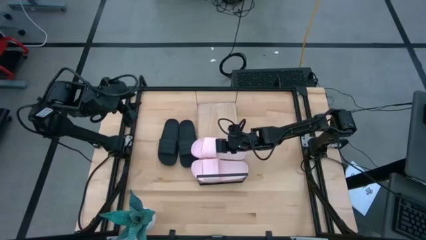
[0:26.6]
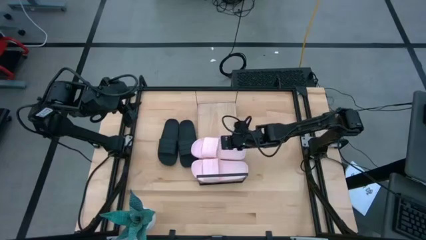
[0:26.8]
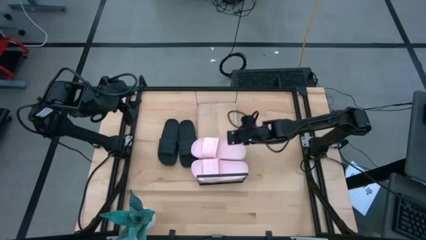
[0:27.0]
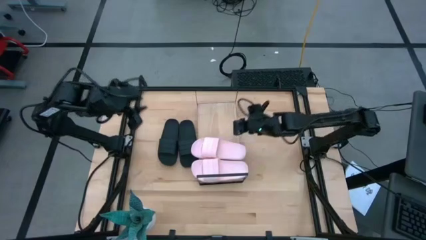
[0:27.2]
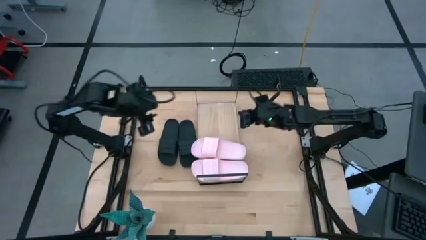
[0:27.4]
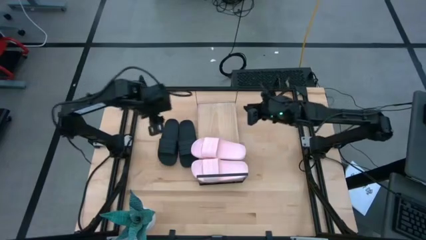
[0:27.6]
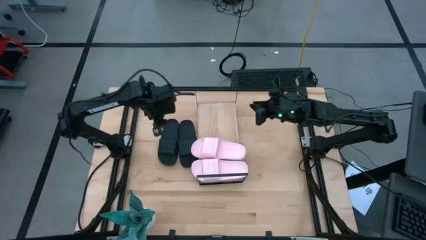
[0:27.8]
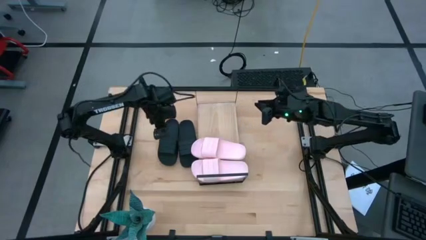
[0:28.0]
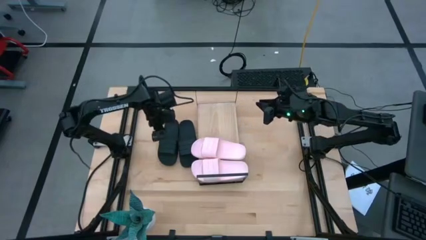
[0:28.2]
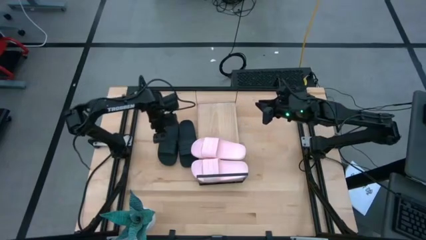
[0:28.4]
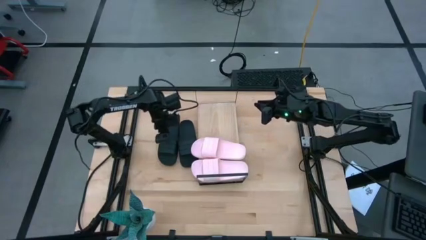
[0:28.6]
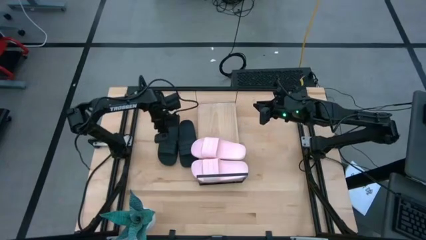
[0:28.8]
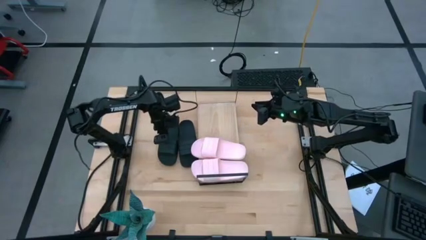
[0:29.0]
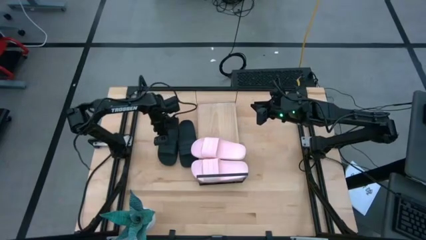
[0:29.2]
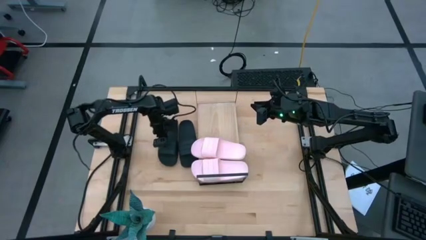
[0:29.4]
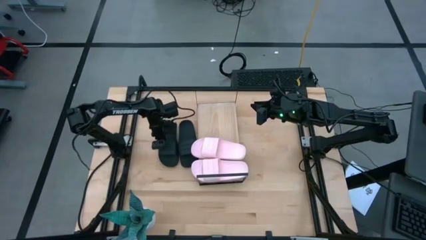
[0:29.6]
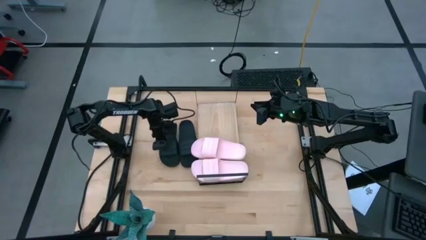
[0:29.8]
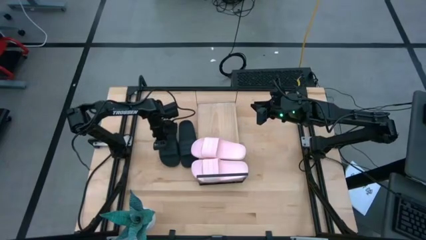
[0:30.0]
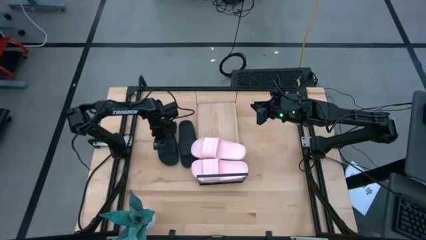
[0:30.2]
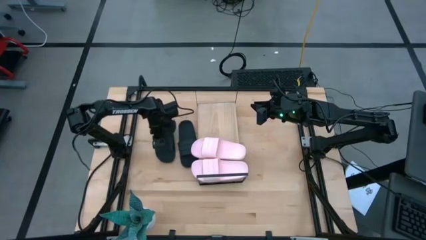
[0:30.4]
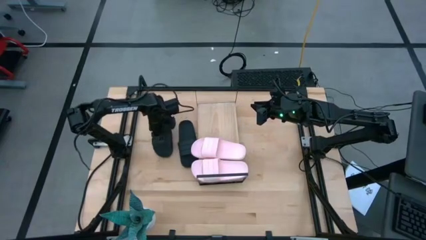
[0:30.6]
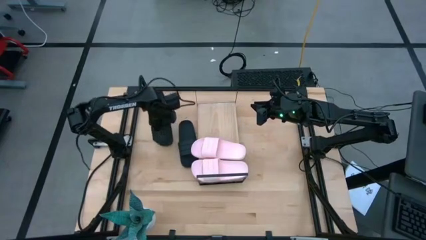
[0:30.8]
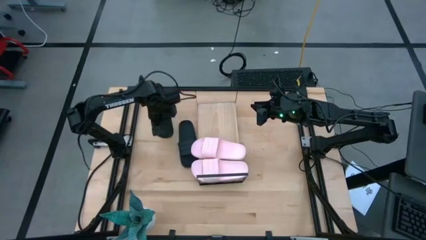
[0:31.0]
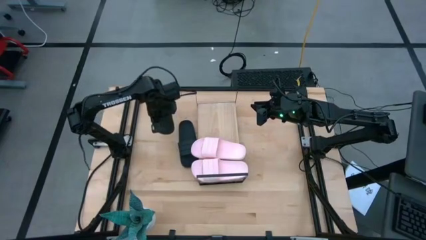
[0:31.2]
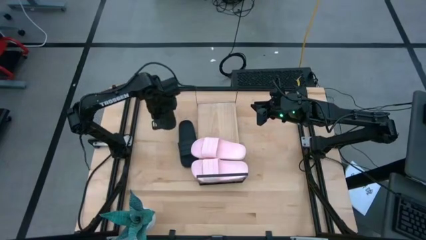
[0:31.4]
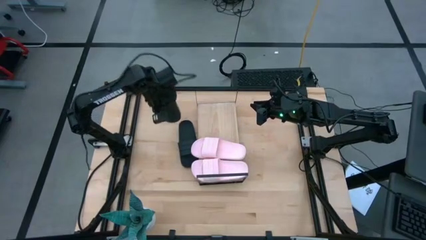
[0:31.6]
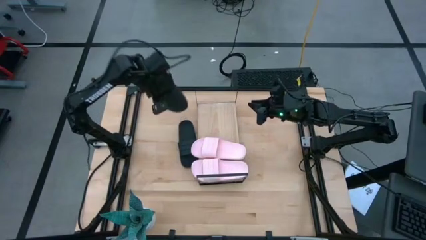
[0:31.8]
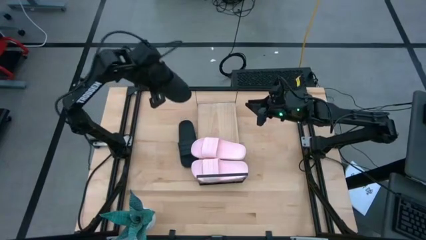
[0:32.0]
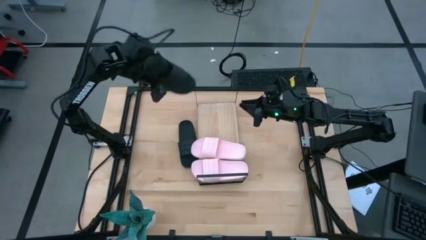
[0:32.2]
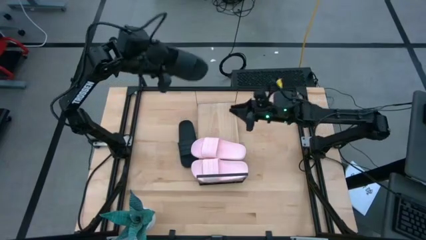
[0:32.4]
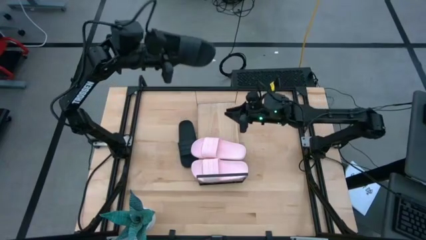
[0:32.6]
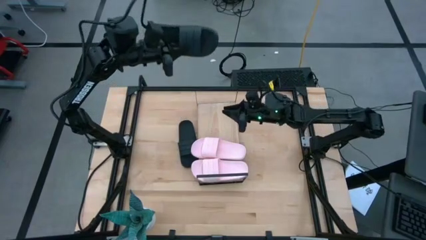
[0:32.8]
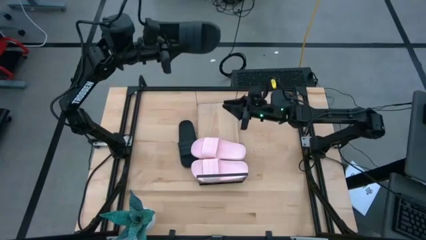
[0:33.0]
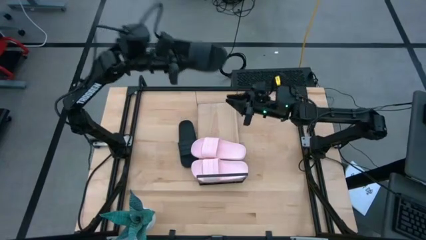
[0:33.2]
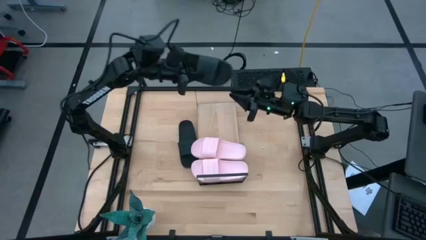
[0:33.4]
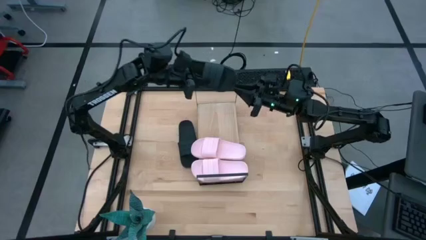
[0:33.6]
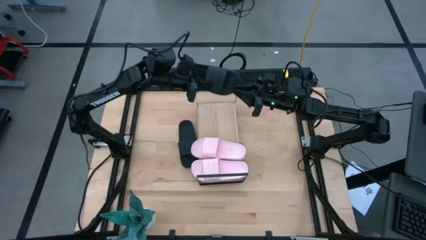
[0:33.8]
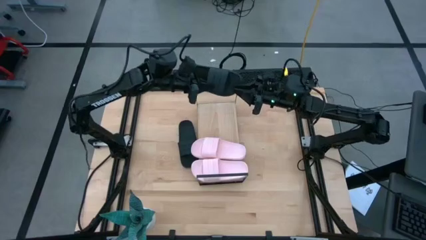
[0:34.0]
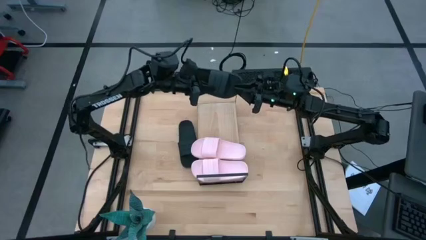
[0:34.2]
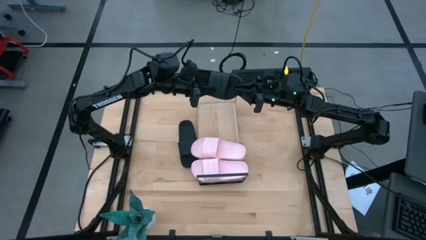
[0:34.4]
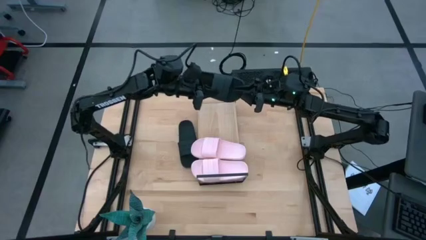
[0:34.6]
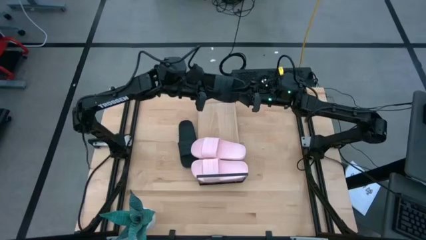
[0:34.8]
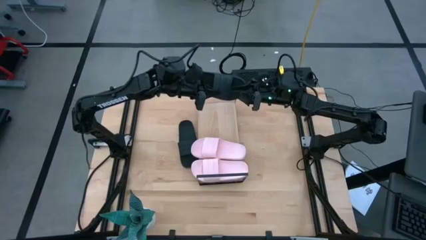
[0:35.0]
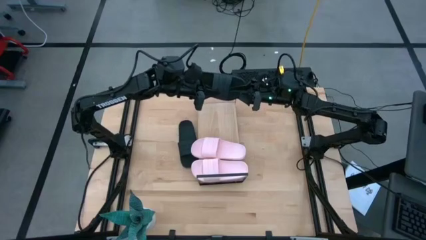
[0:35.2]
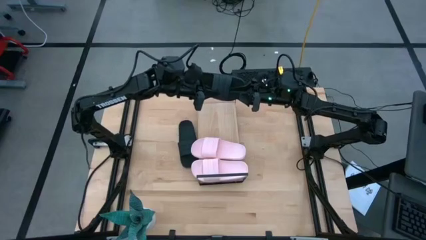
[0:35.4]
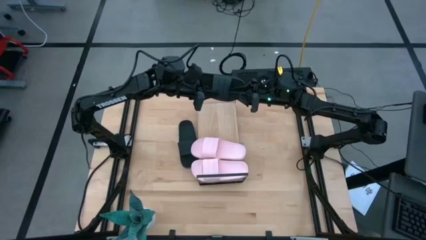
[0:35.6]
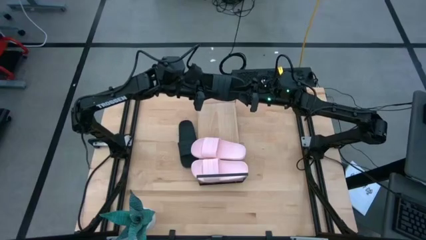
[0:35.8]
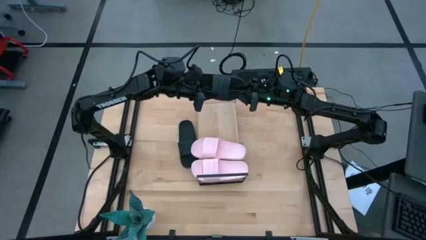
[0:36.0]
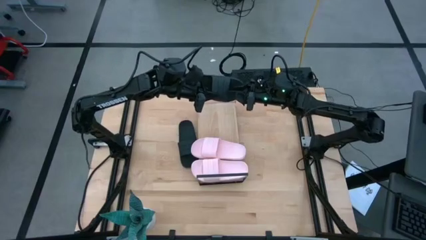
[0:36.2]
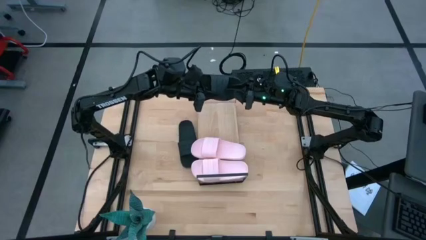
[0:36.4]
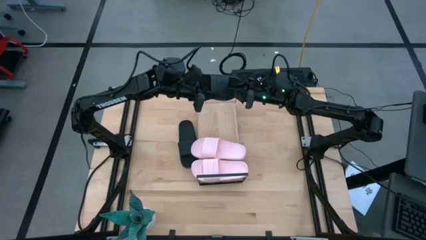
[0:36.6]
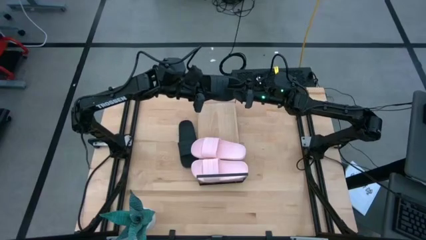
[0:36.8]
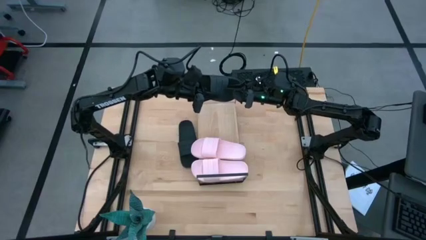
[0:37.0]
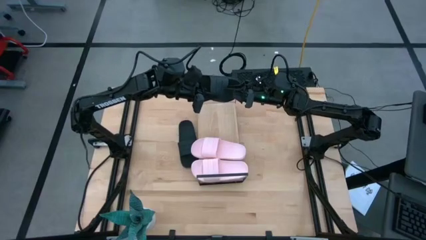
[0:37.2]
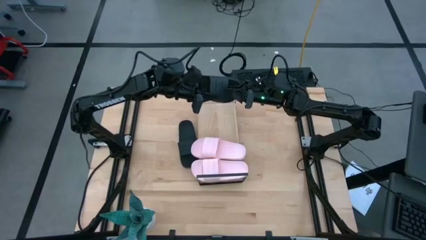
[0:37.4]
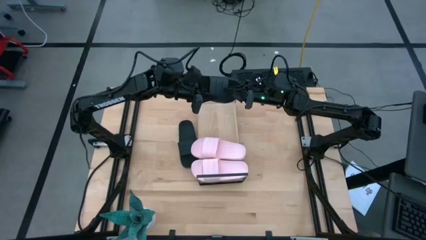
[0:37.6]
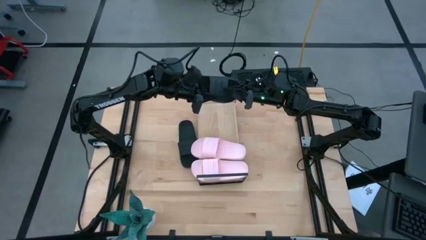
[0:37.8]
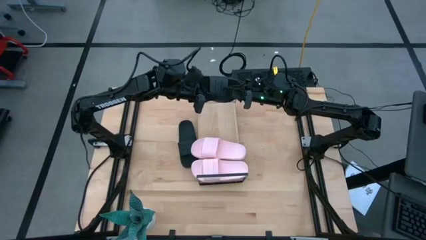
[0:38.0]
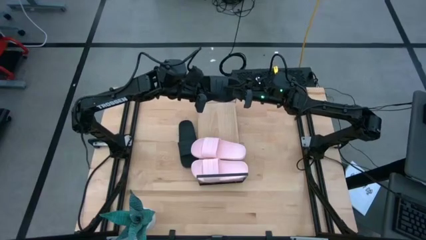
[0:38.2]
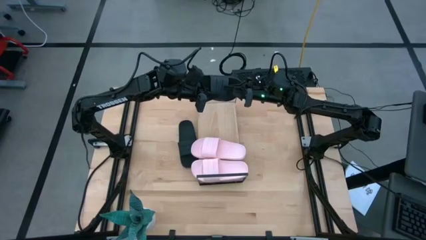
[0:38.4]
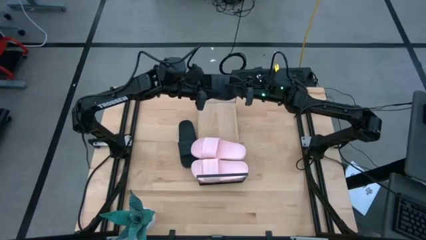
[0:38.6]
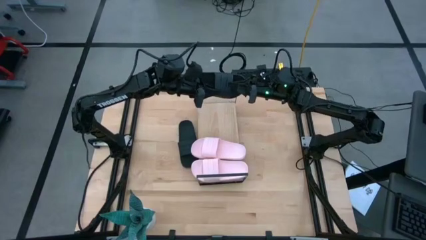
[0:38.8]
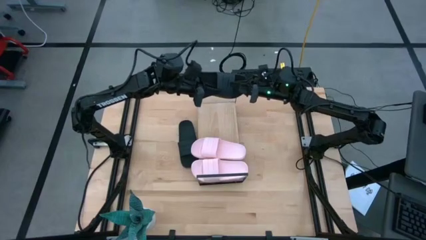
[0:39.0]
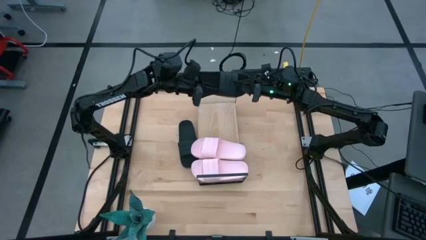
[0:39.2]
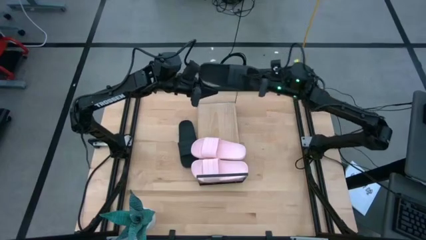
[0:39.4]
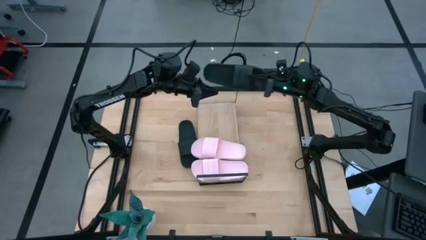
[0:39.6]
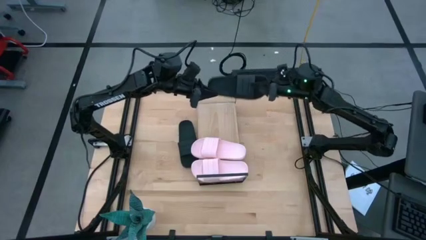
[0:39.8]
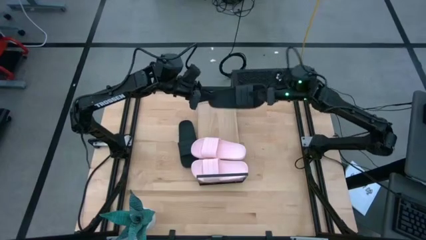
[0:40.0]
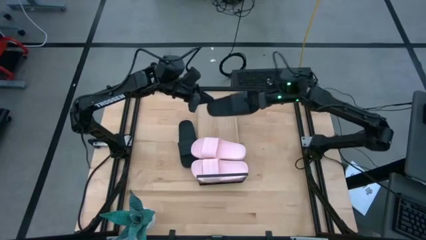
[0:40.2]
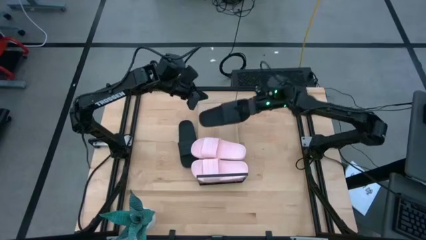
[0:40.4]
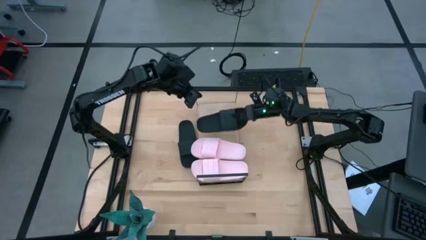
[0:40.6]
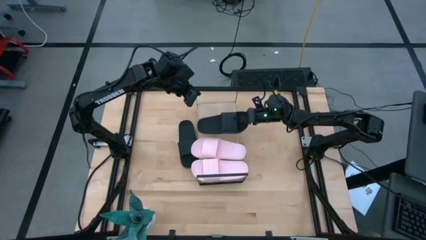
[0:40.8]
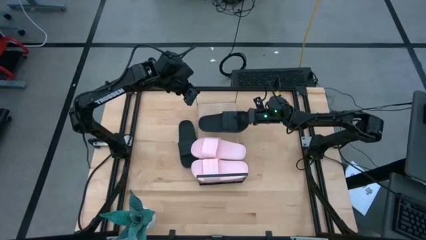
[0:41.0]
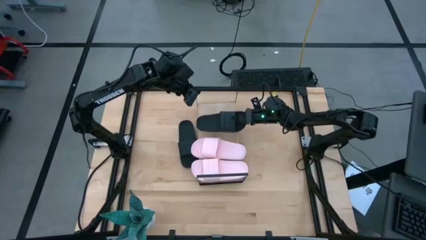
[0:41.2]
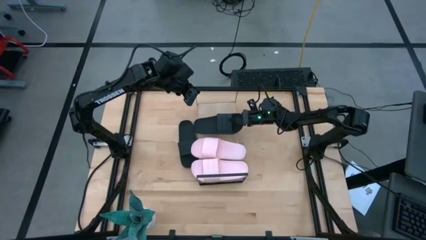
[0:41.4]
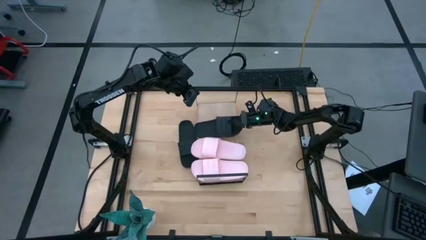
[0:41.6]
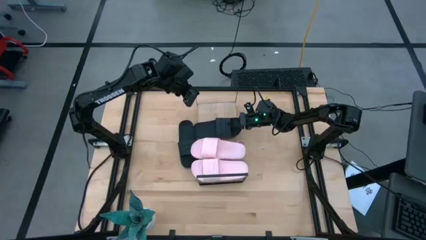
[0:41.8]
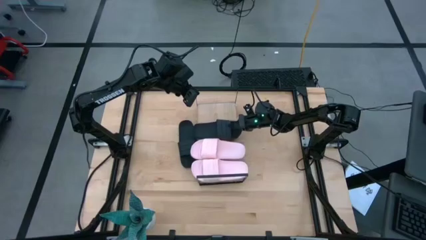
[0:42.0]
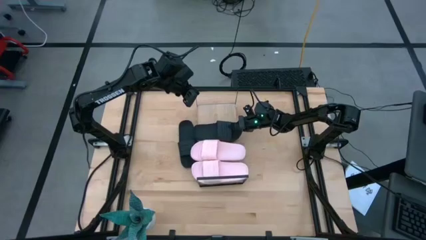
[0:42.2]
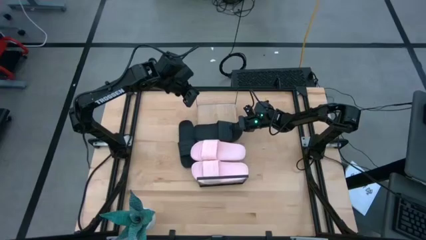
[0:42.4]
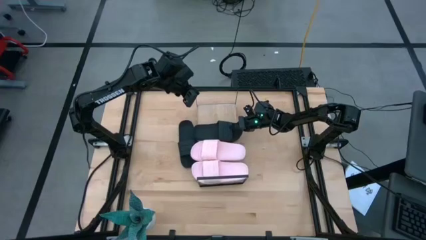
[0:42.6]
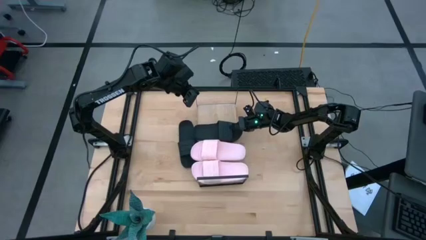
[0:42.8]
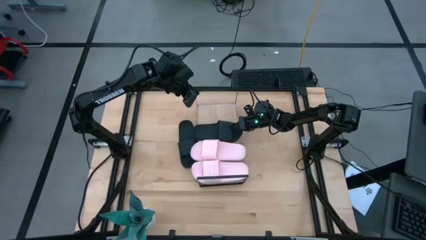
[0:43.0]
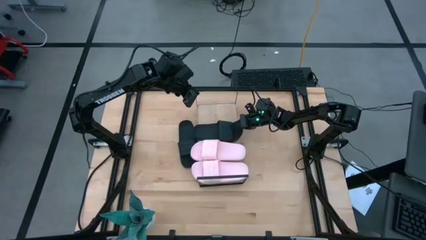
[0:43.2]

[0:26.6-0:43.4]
Task: Pick and place slides into the shelf
Put the left black slipper on the shelf
